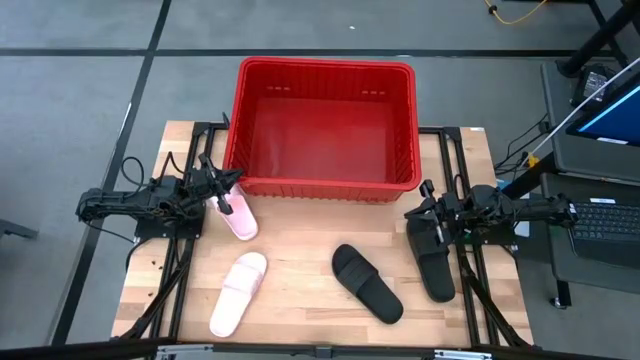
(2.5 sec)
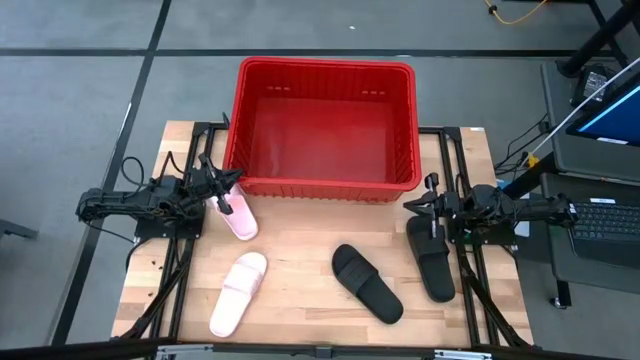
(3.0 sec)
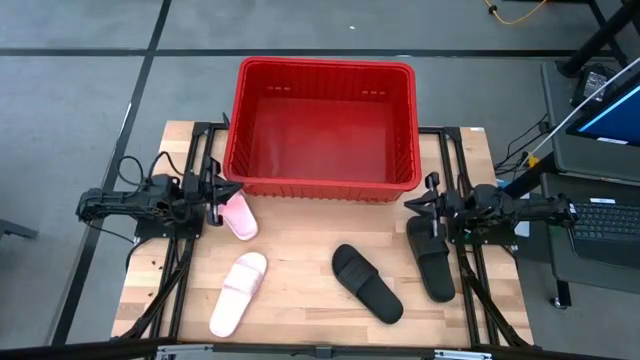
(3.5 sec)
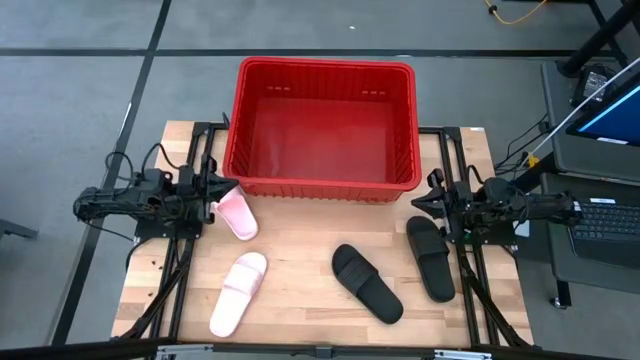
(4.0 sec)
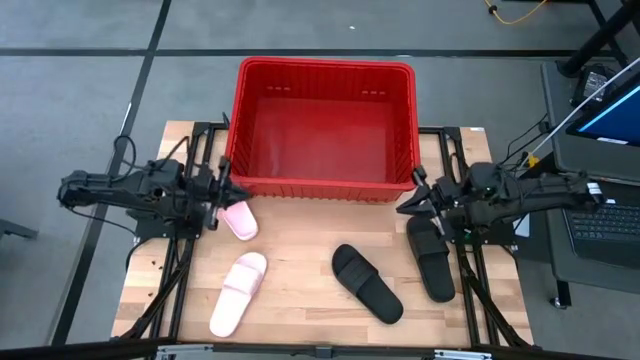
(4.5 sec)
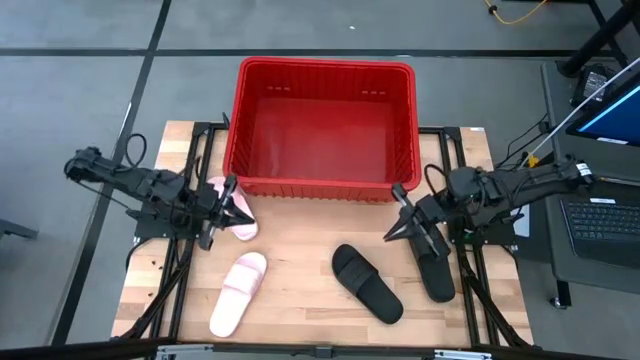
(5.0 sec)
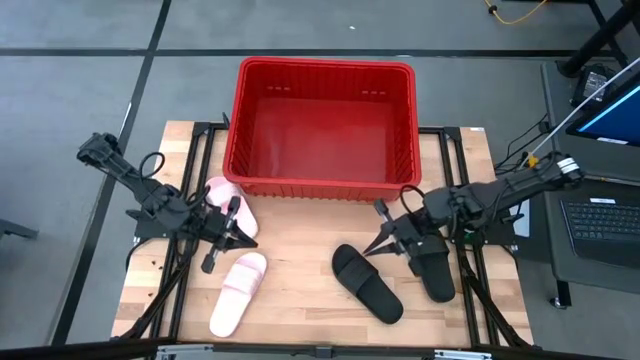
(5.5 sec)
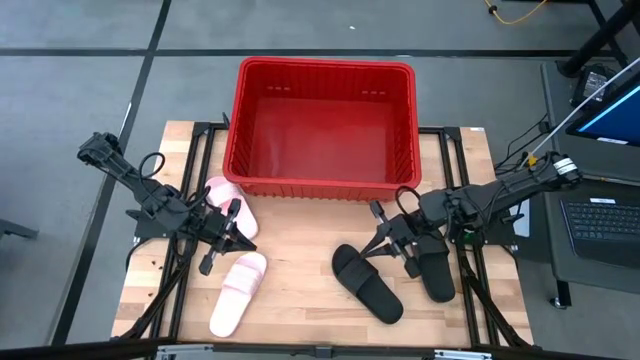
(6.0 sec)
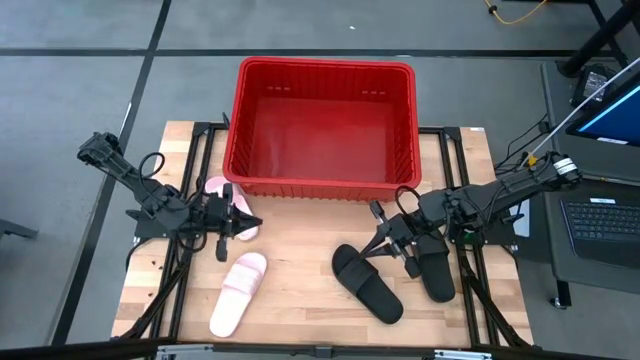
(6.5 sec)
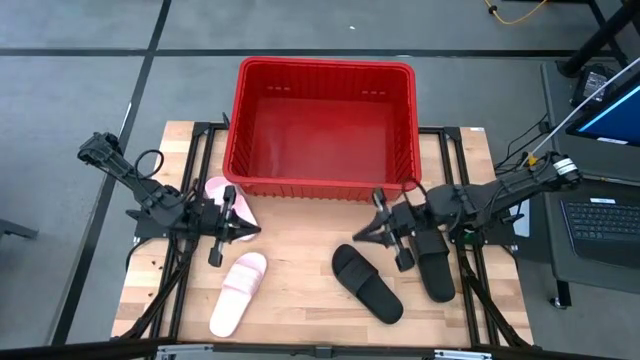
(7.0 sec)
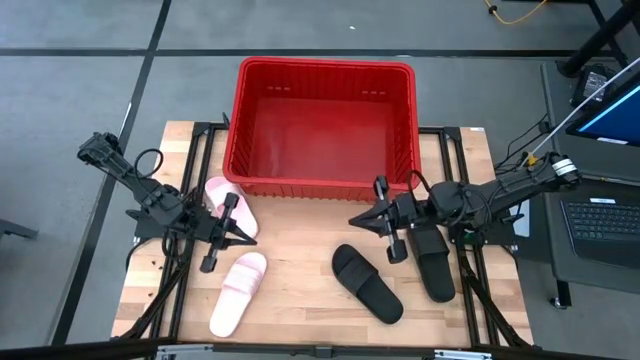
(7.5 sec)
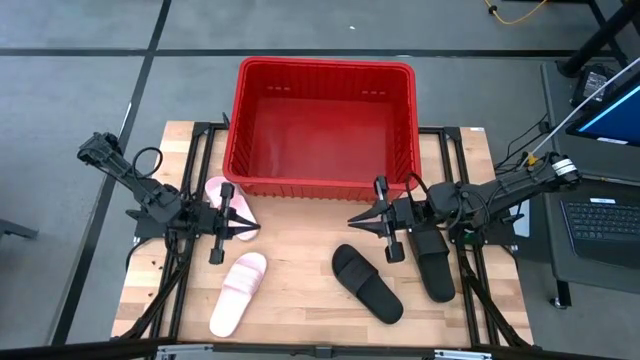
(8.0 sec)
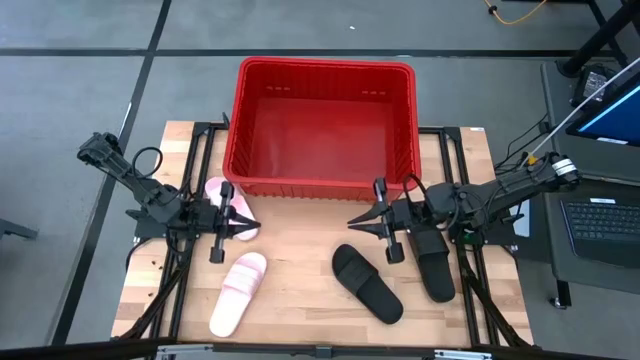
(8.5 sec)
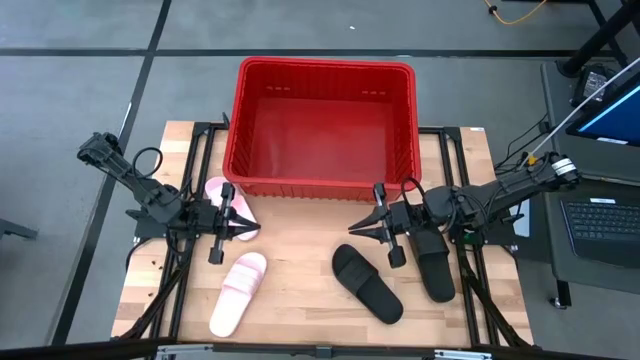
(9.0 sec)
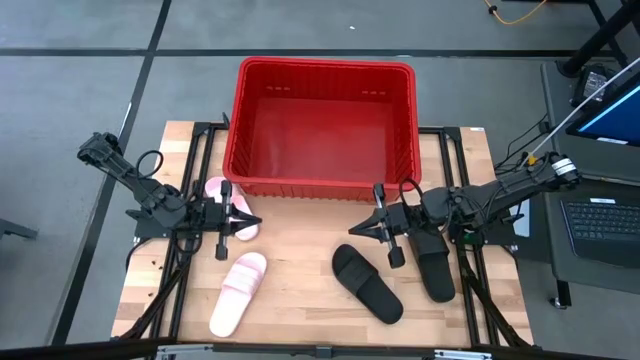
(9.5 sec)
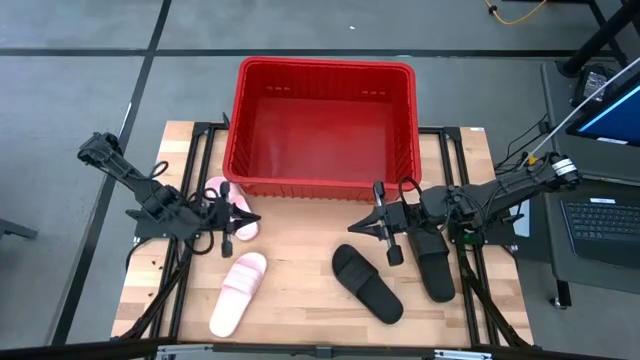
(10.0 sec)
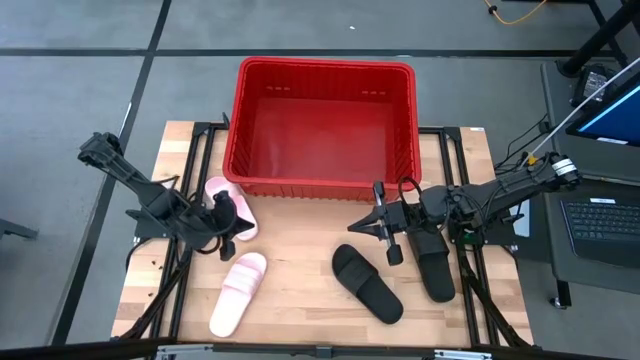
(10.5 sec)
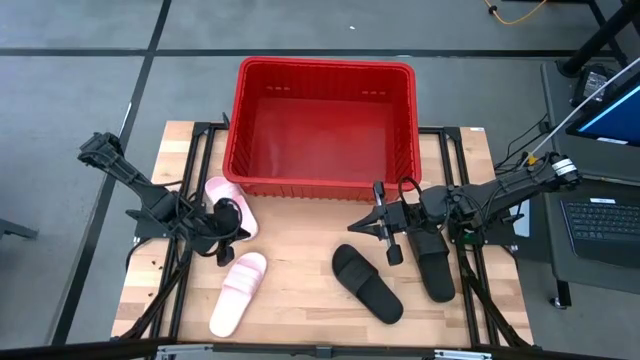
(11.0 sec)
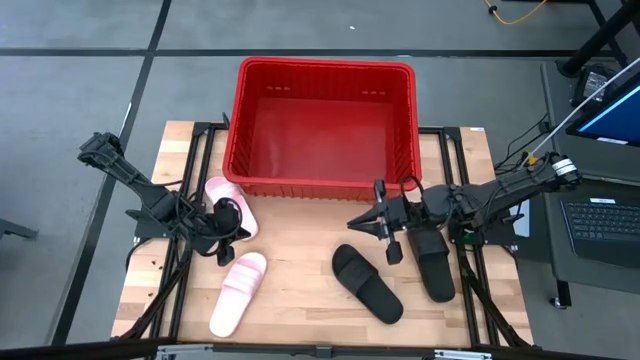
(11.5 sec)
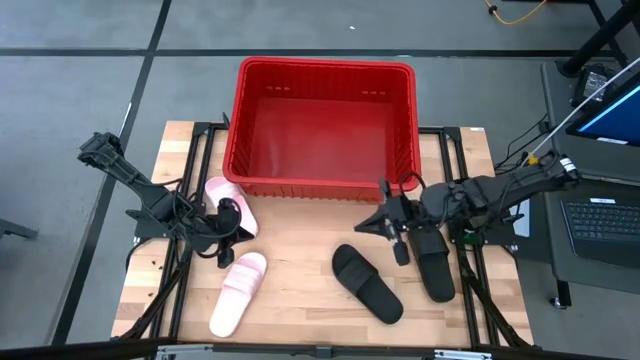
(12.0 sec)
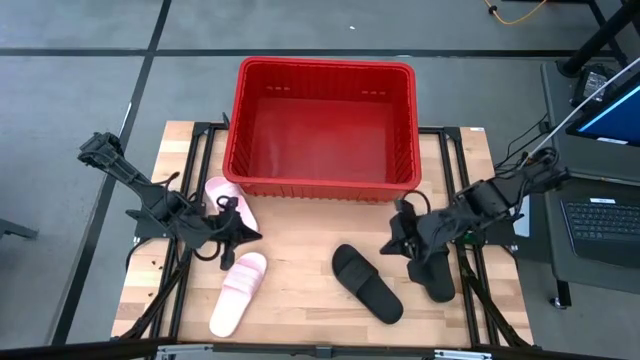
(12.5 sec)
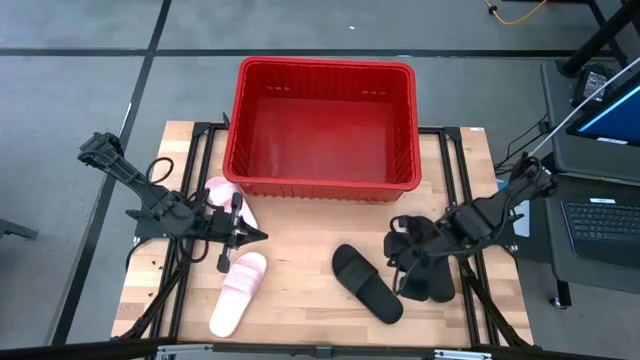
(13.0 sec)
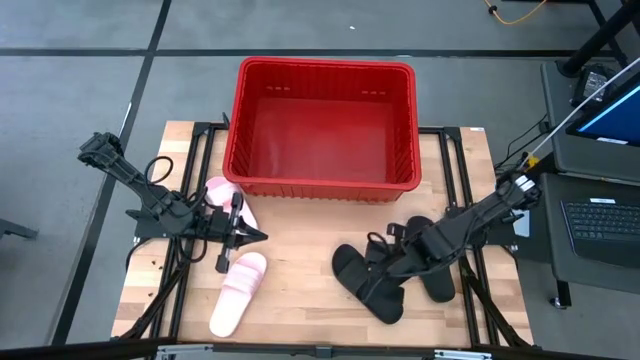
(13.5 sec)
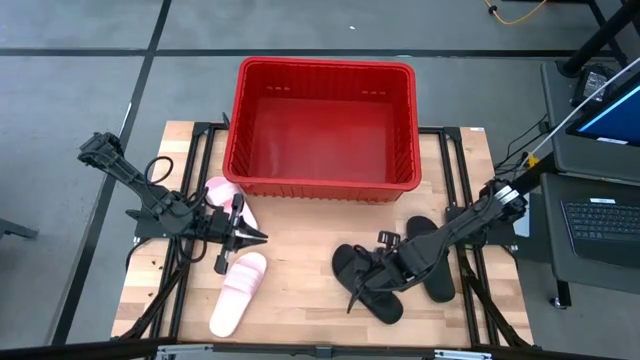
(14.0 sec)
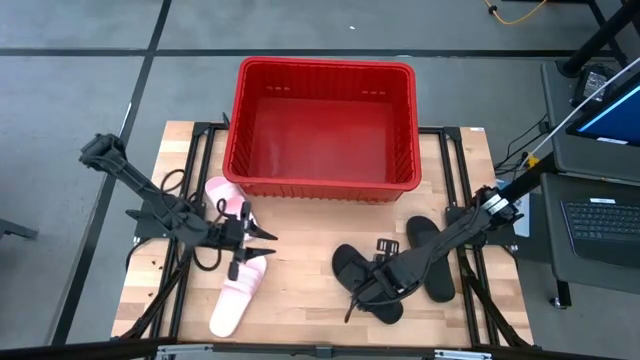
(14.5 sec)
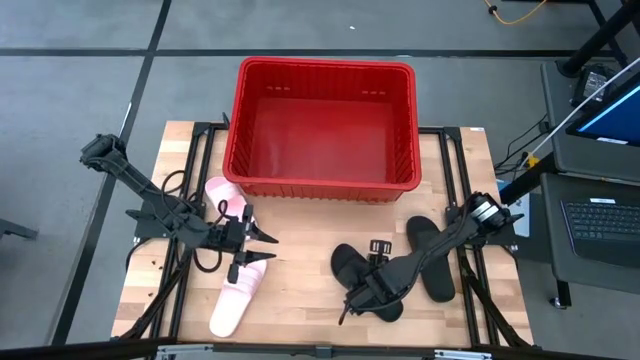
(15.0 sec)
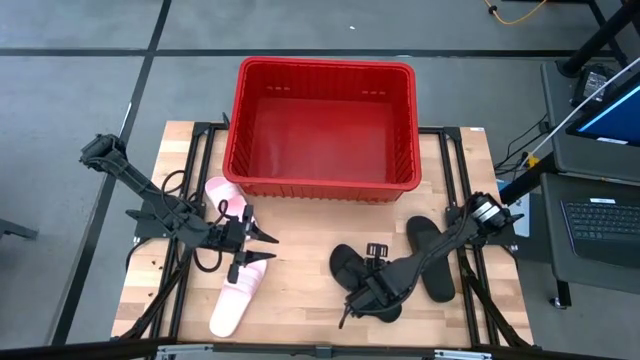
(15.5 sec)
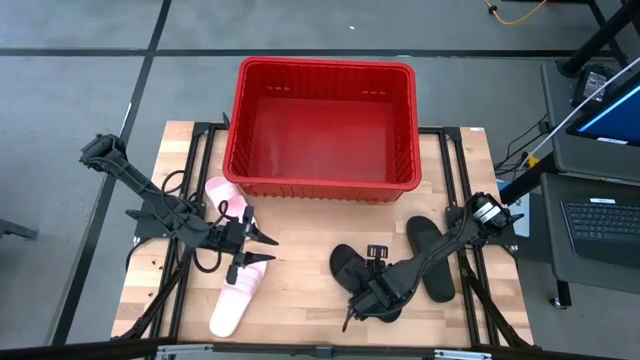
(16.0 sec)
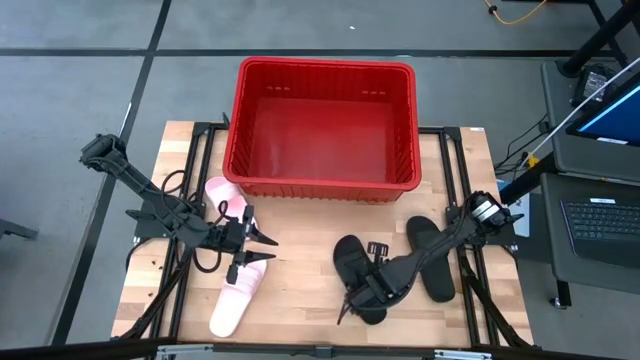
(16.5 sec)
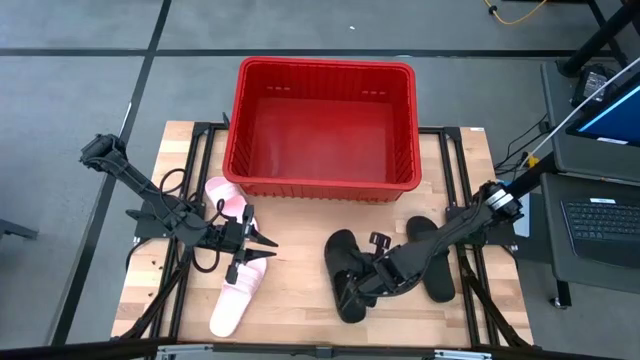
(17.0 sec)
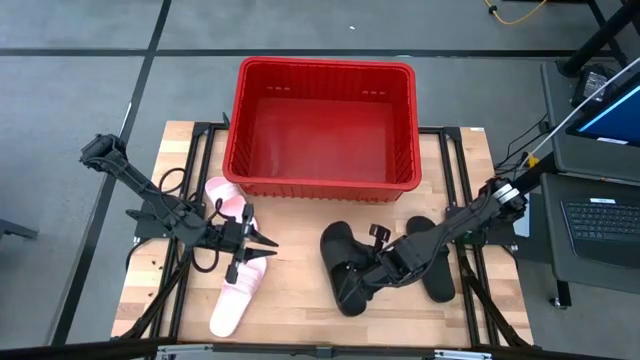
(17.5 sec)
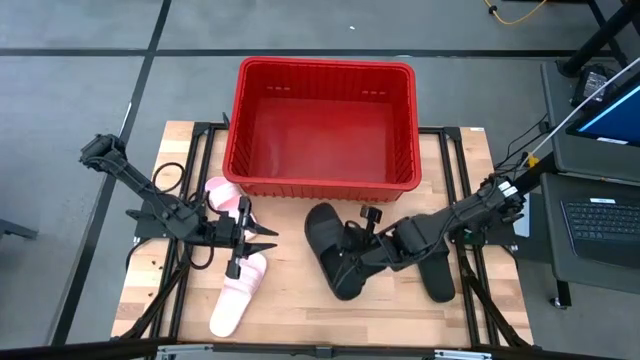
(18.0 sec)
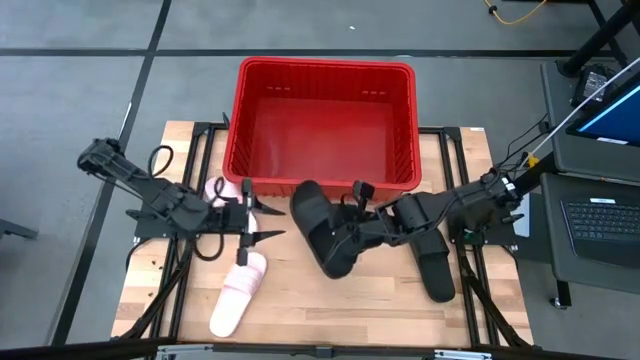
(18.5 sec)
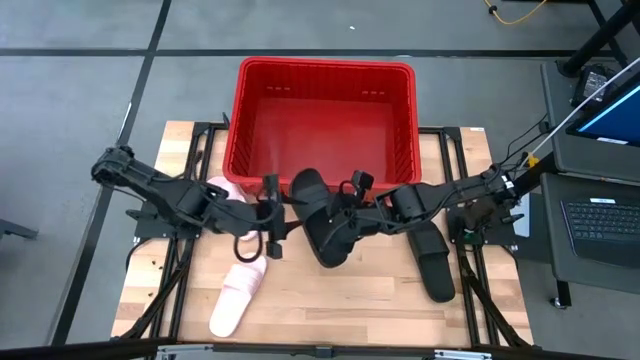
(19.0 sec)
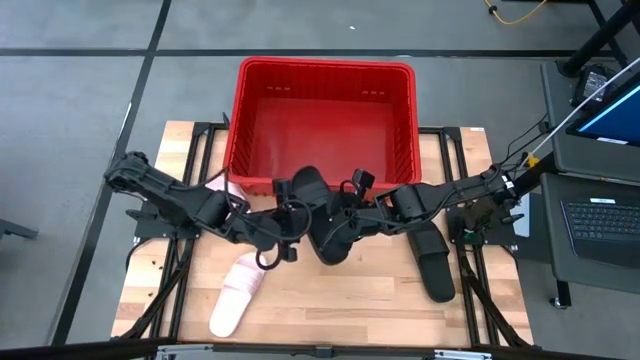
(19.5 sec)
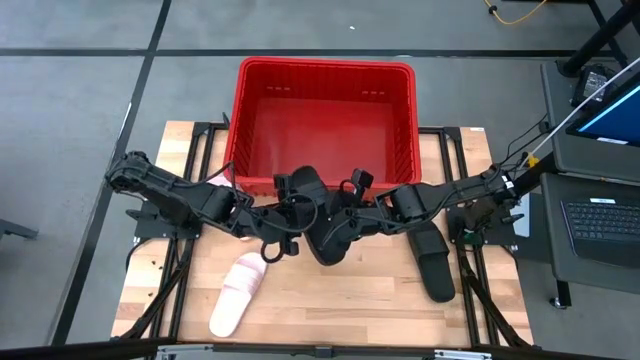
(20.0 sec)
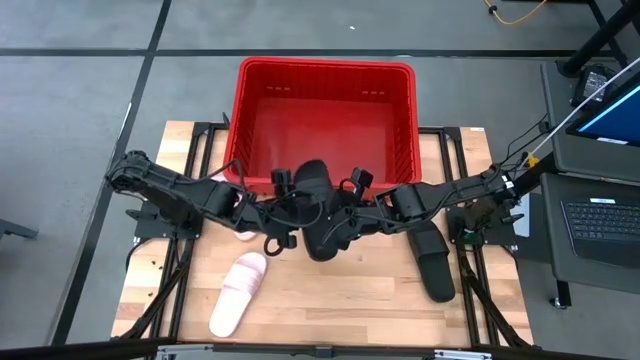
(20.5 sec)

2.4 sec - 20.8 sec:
Task: Pick and place slides into bin
Put the left black slide into the red bin
